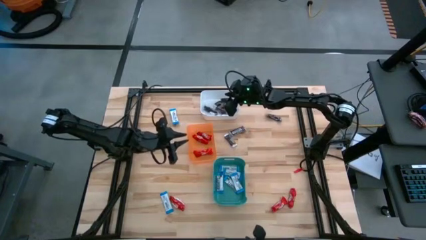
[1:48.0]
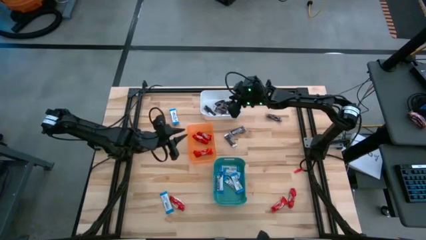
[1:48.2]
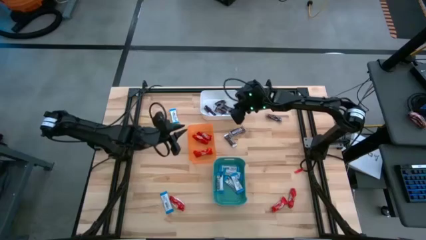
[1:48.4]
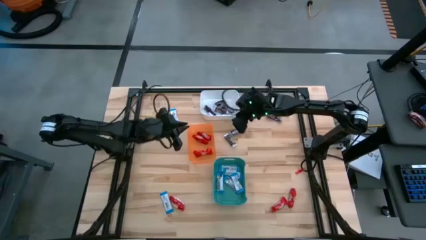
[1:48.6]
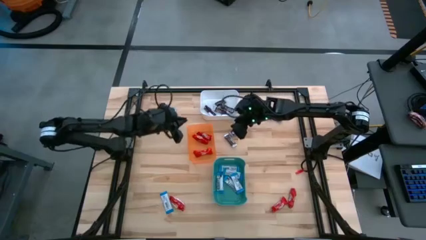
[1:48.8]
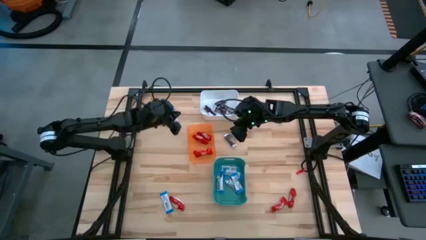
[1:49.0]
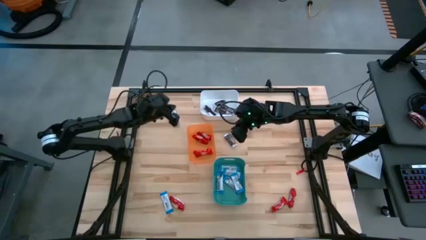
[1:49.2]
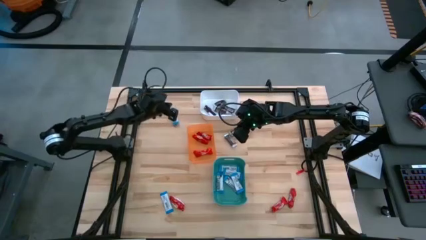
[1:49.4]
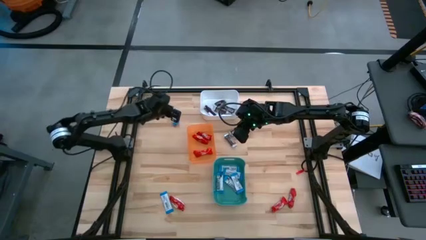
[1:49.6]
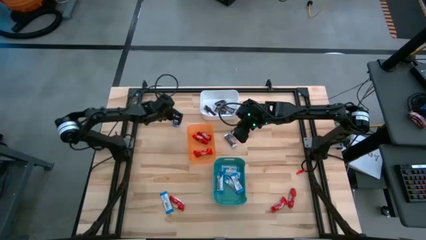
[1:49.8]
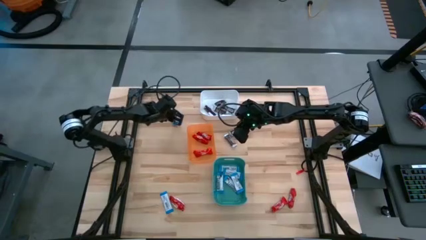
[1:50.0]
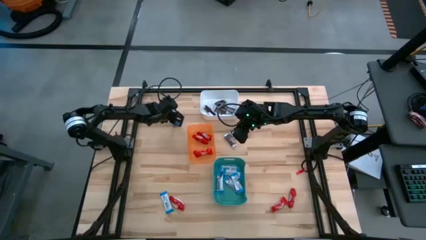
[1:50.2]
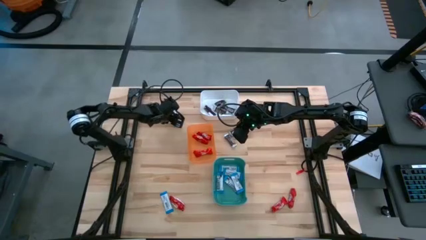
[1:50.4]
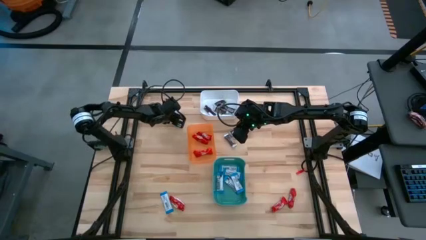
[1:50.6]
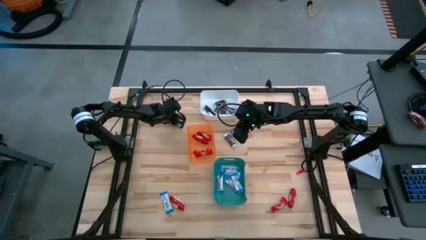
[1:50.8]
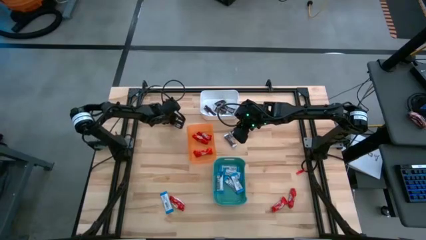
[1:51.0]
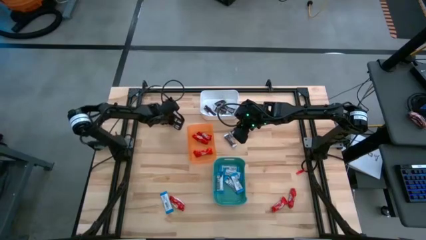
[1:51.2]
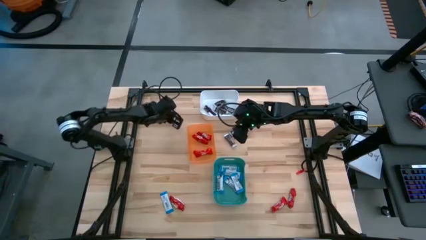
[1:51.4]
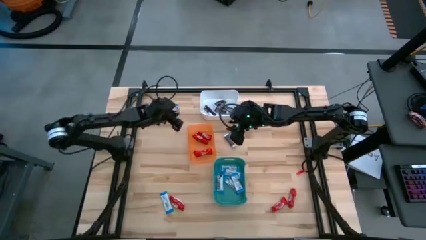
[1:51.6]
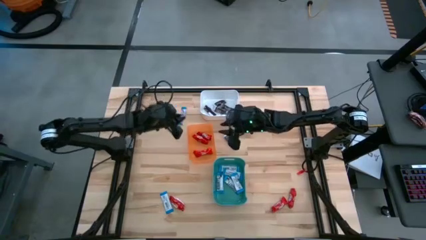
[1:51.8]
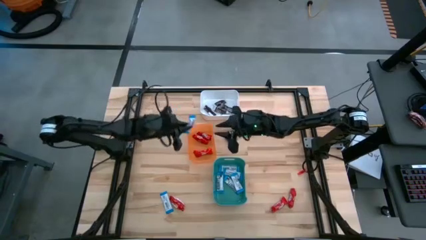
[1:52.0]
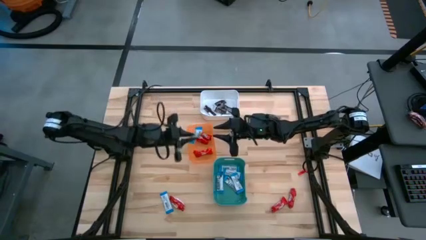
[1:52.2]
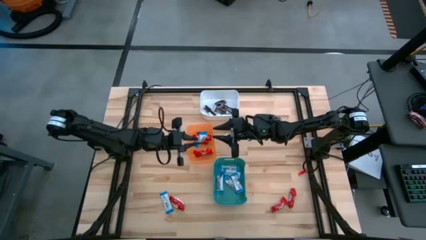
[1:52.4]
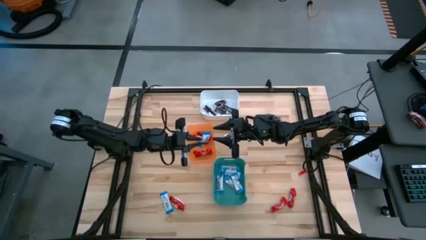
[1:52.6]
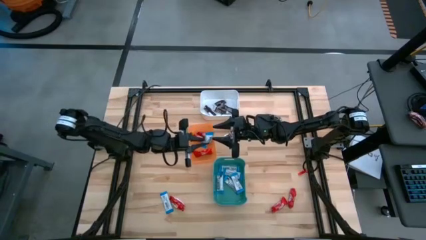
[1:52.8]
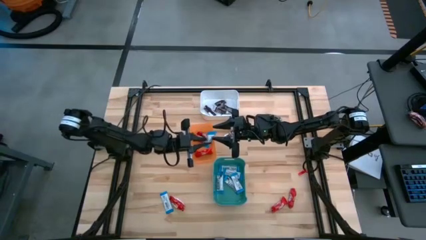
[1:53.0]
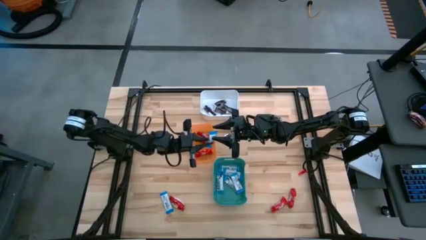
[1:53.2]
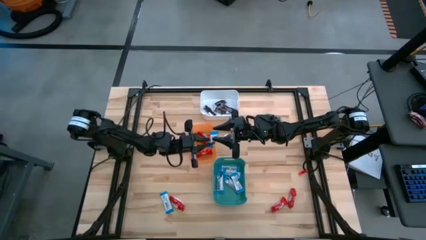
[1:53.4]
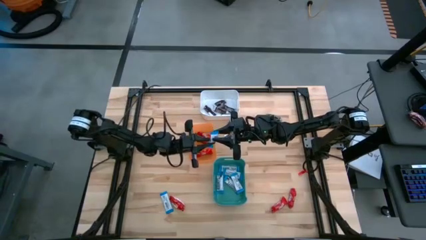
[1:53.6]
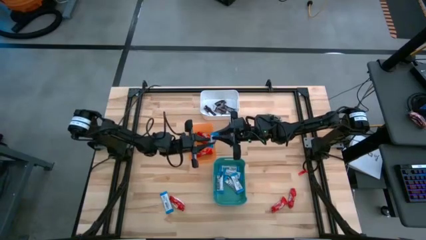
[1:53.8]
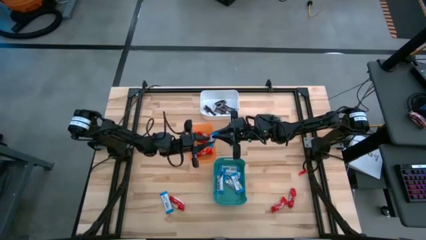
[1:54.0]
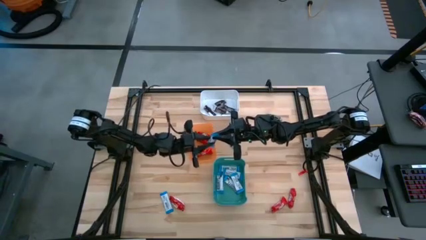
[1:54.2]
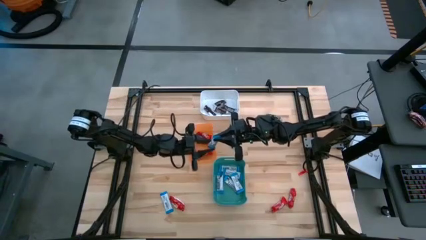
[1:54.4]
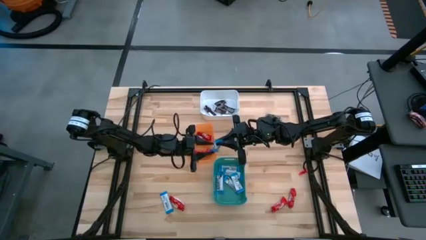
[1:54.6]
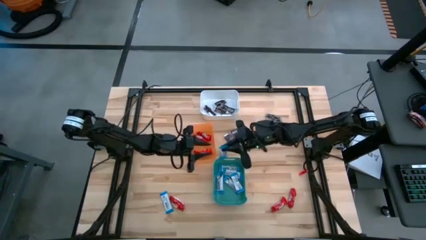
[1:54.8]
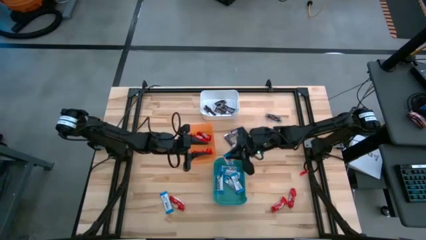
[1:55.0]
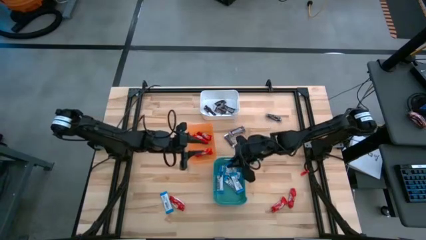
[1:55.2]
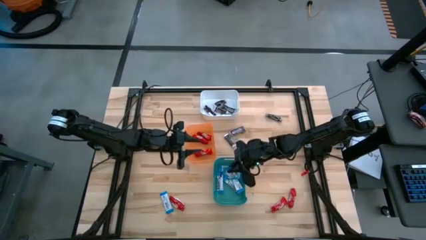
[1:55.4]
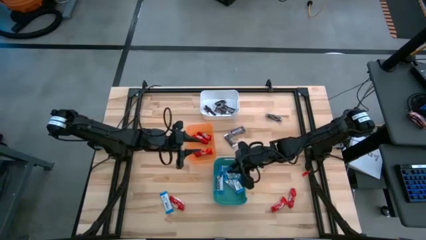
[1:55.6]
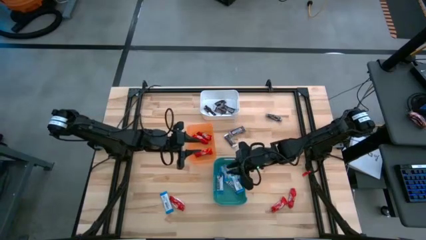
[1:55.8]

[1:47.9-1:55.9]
Task: Sort candy
Put the white chocolate bar into the green bin

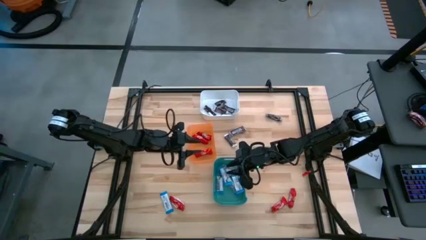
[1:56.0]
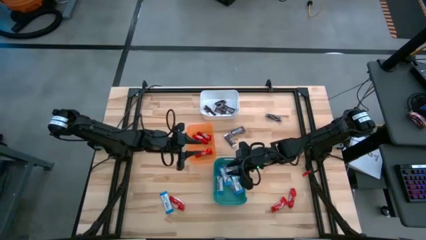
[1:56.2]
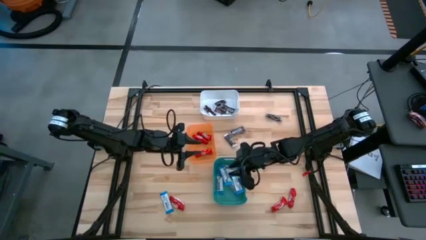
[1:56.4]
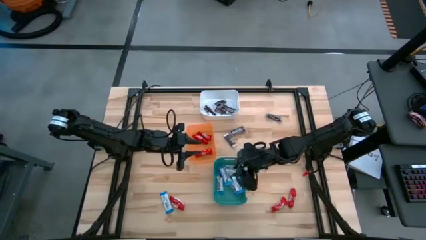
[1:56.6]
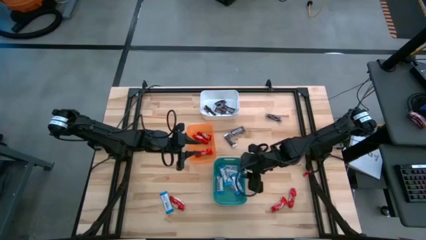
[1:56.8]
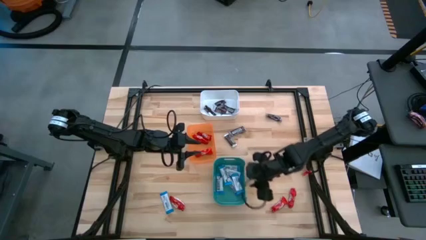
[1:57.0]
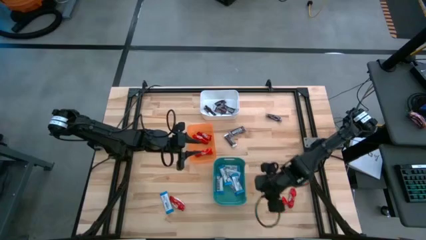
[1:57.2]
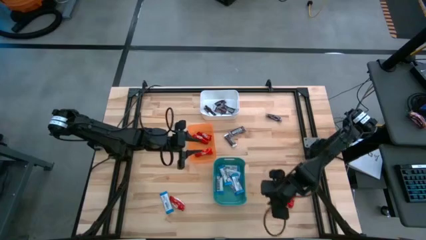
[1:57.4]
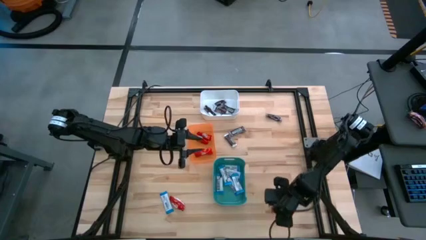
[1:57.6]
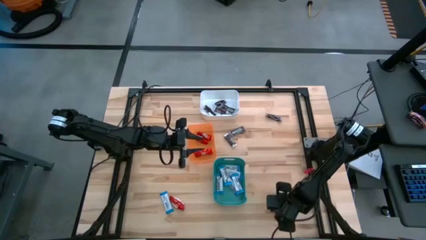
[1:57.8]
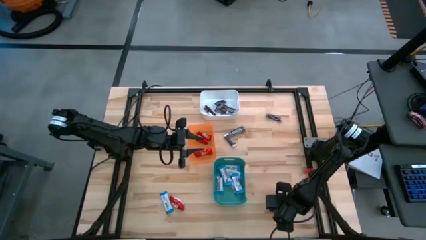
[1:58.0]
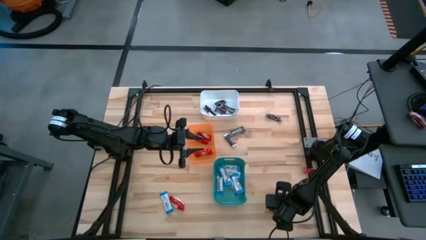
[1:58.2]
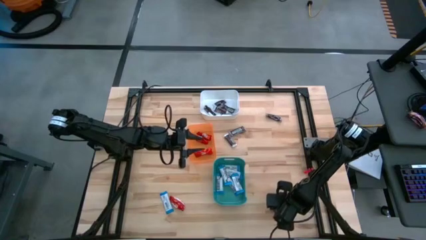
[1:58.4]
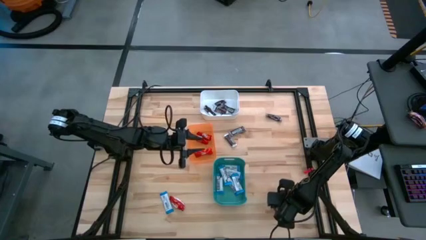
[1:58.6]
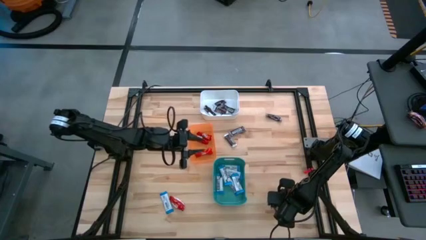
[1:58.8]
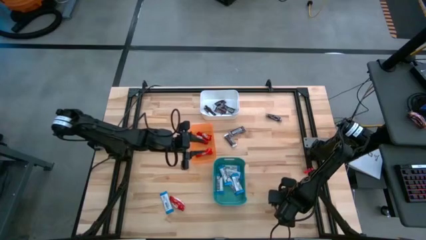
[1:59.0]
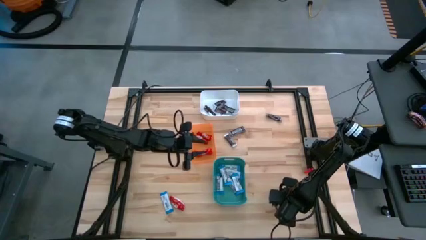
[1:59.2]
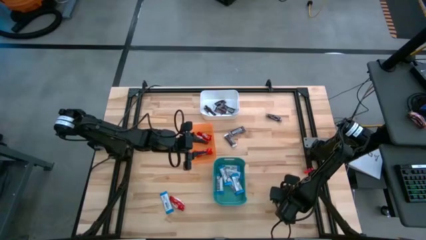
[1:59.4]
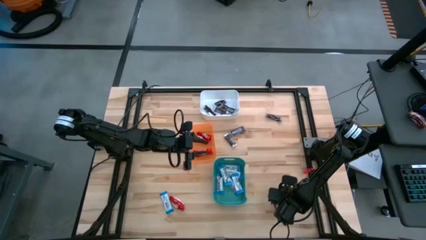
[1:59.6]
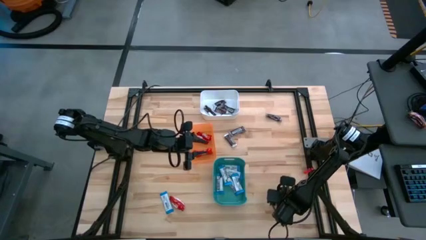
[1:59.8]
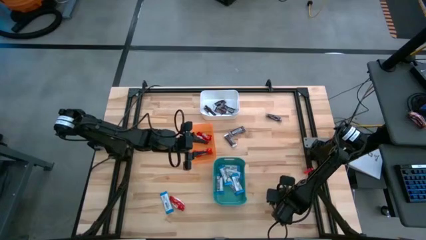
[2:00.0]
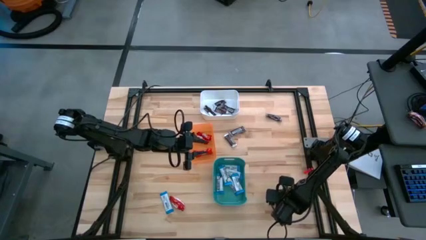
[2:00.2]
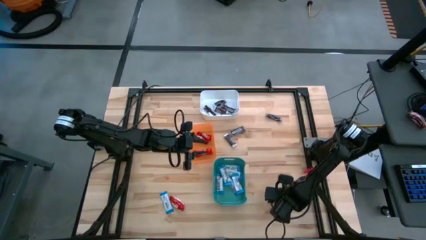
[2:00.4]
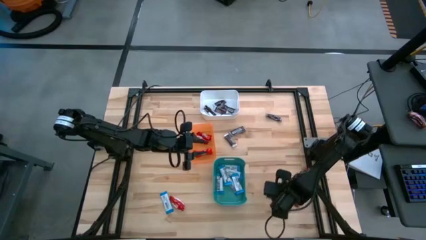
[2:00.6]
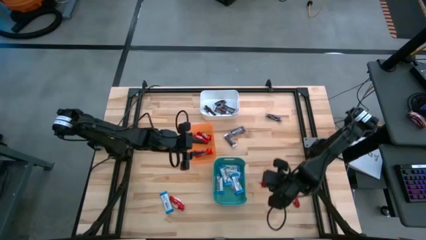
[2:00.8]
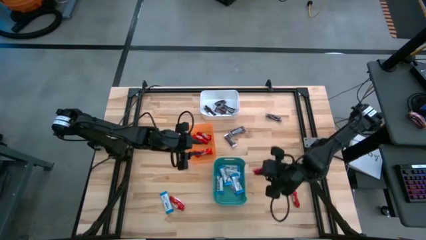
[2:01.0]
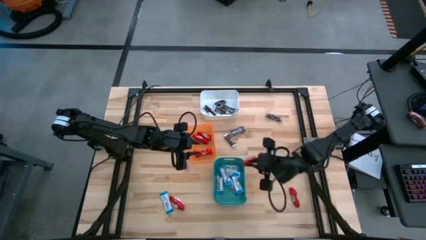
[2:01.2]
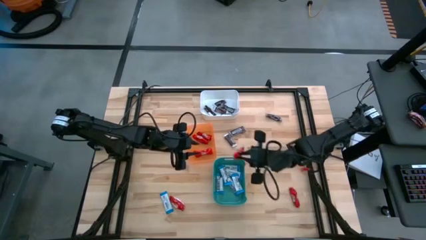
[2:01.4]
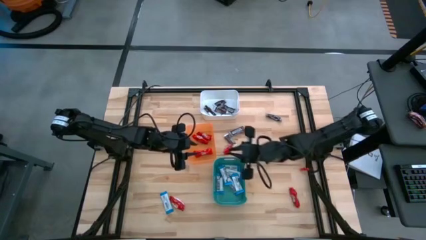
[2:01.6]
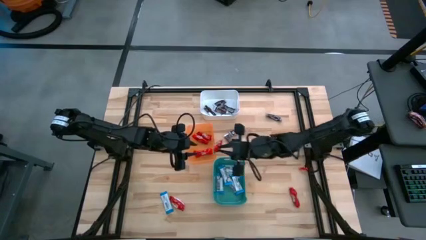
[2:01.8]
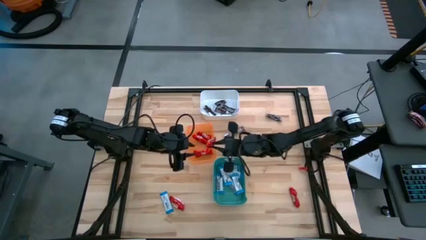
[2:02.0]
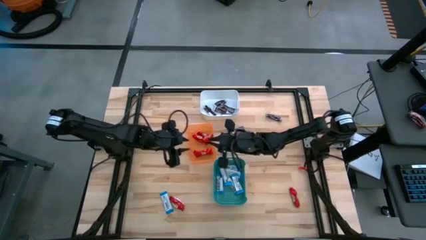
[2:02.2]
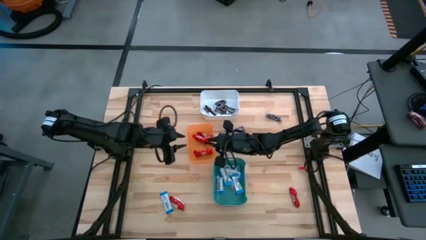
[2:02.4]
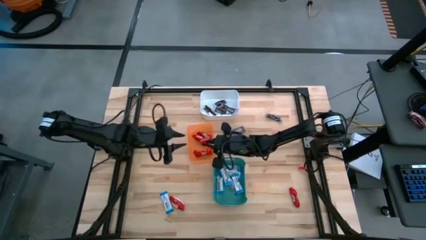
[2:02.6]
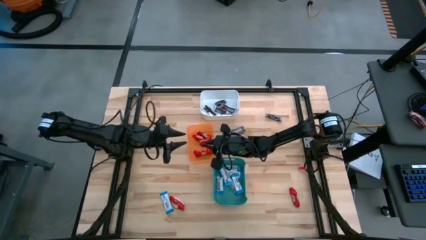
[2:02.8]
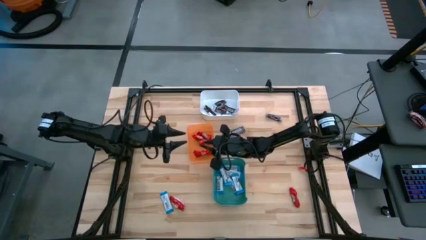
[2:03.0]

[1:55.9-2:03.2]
Put the red chocolate bar into the orange bin

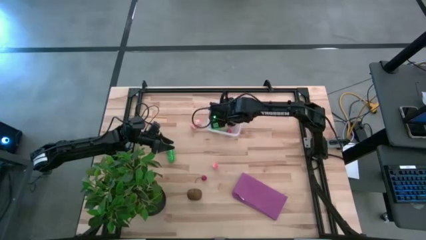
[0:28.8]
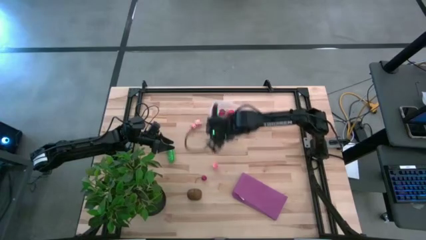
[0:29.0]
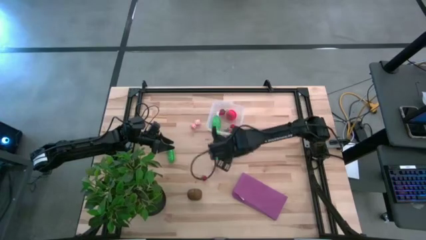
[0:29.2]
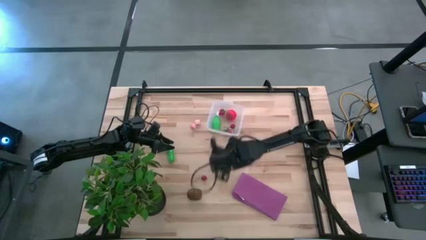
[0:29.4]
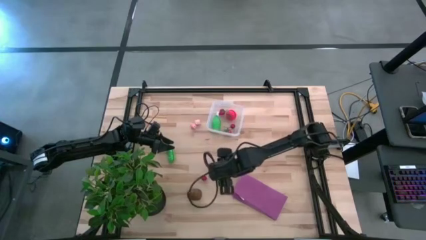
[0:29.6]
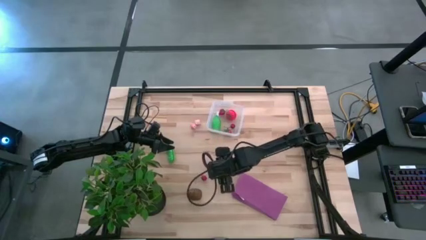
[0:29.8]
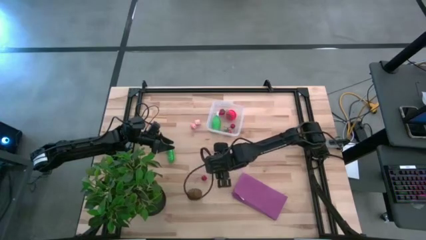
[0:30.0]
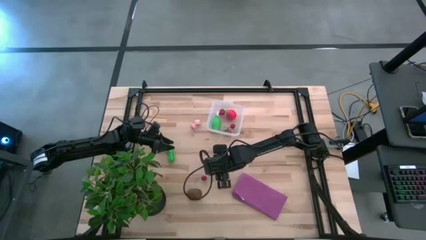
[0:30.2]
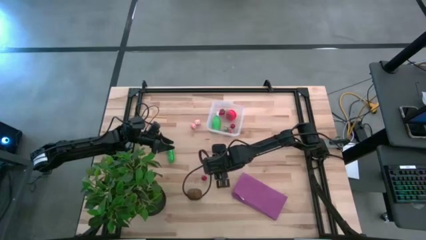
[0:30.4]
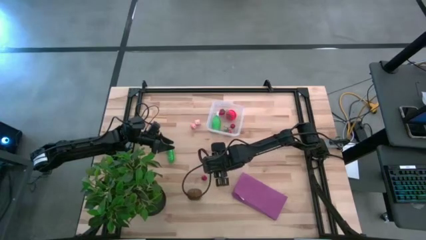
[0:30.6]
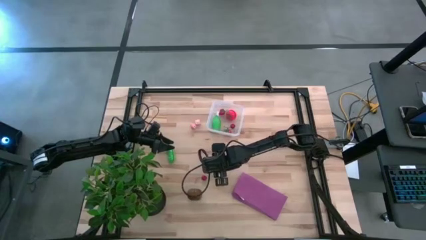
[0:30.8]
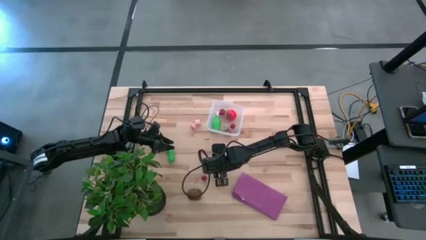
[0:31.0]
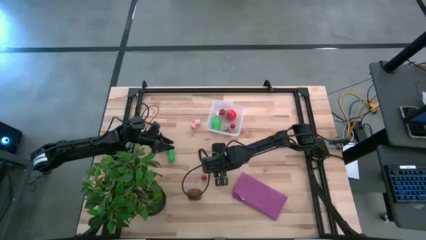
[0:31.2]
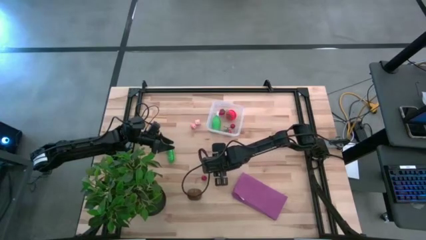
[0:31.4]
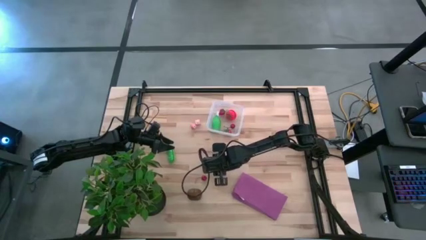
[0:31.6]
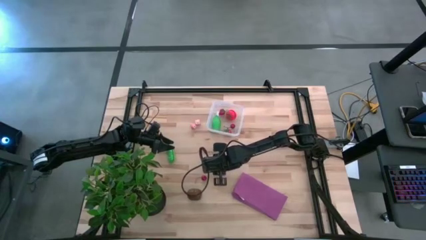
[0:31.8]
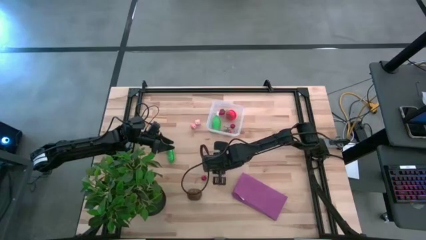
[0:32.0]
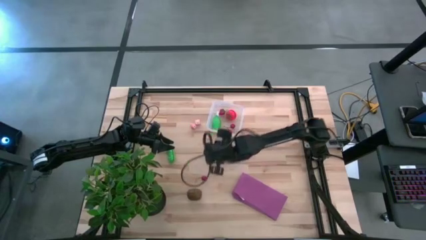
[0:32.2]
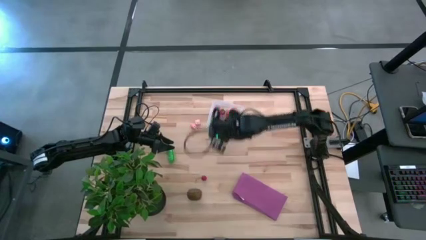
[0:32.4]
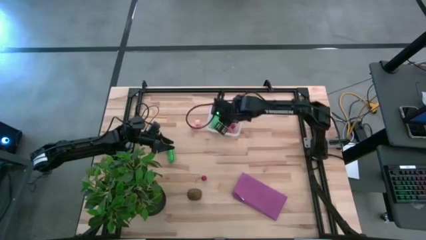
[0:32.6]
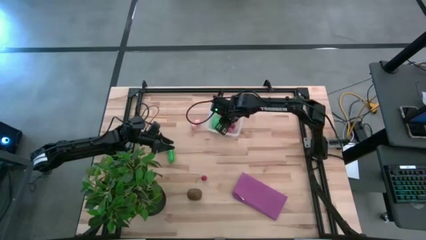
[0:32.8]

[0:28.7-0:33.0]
Task: Pick and placing Produce into tupperware
Put the bottom peach in the transparent bin
